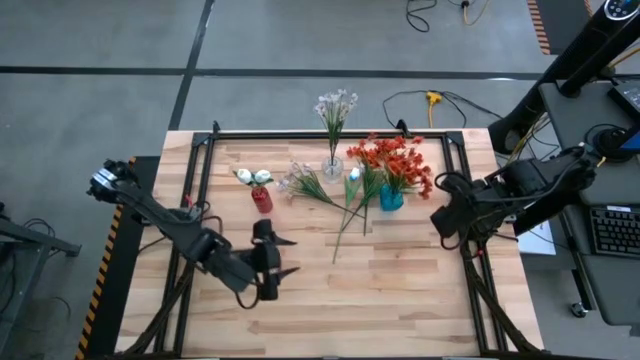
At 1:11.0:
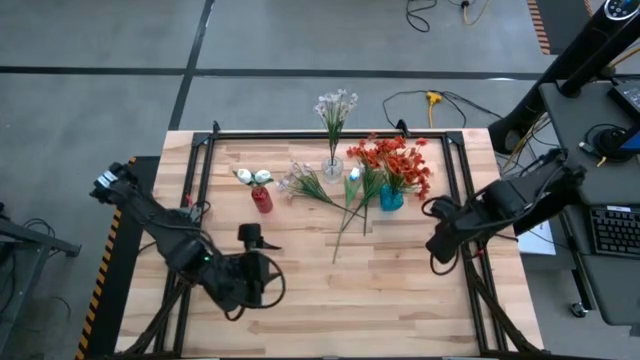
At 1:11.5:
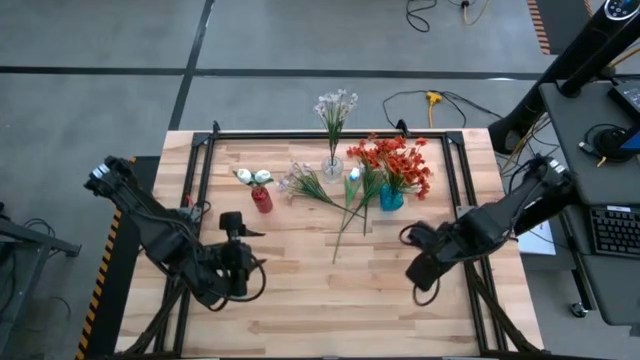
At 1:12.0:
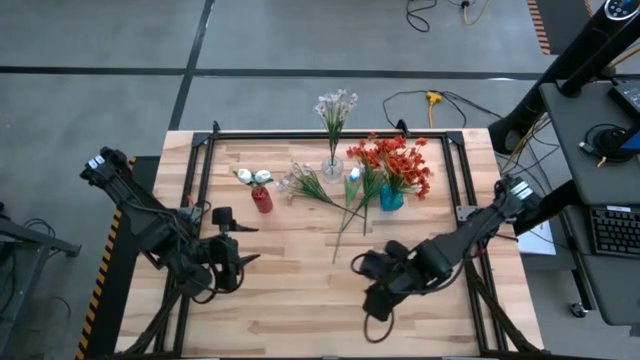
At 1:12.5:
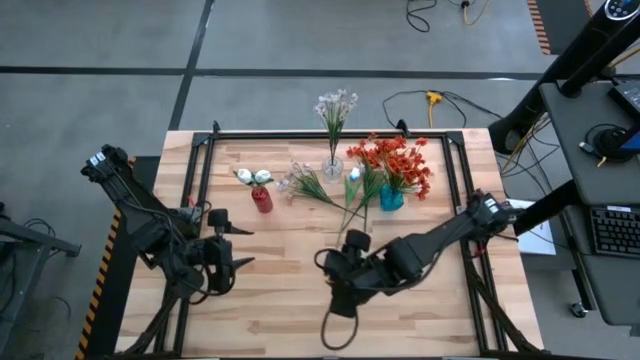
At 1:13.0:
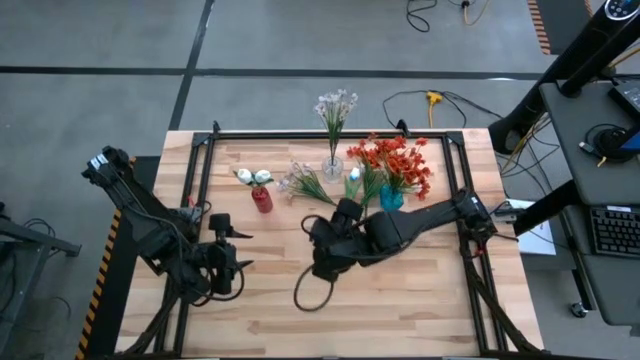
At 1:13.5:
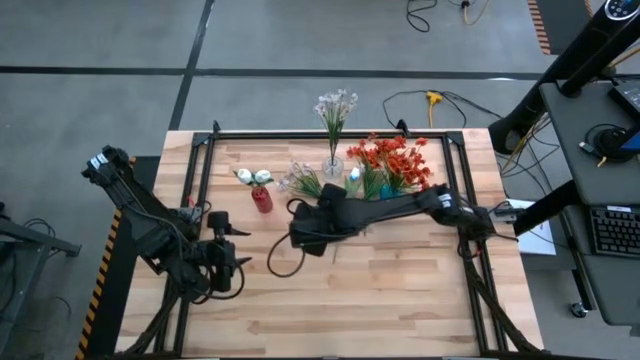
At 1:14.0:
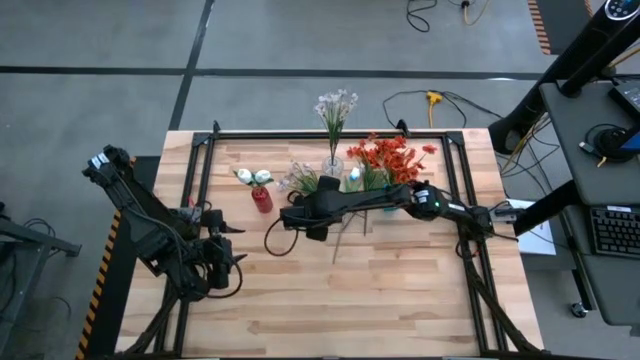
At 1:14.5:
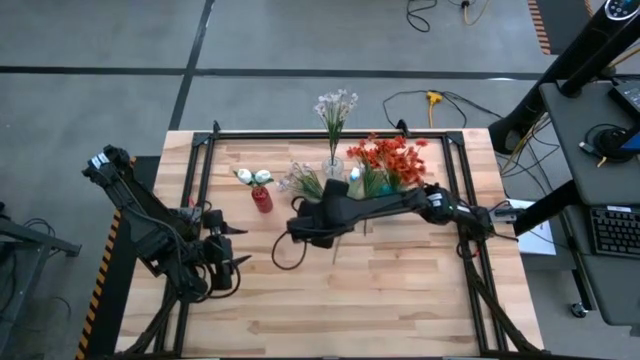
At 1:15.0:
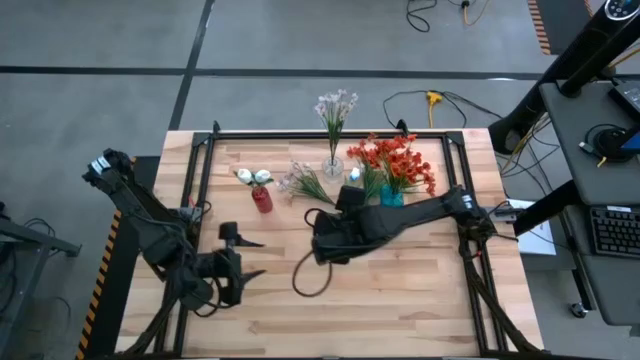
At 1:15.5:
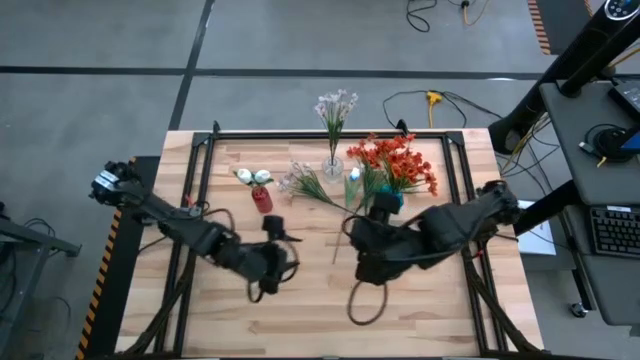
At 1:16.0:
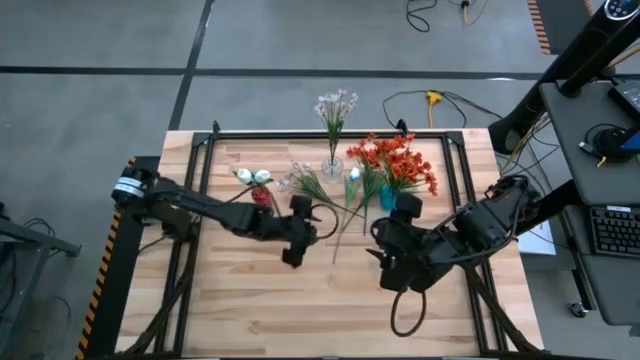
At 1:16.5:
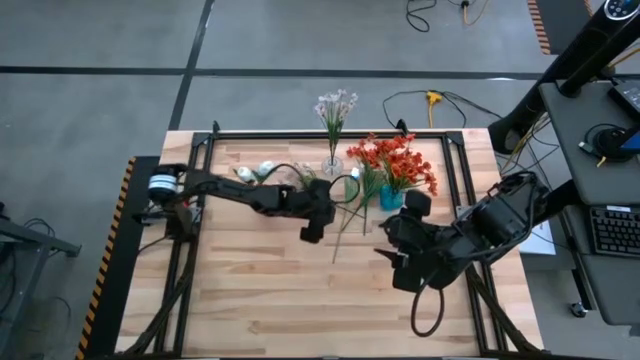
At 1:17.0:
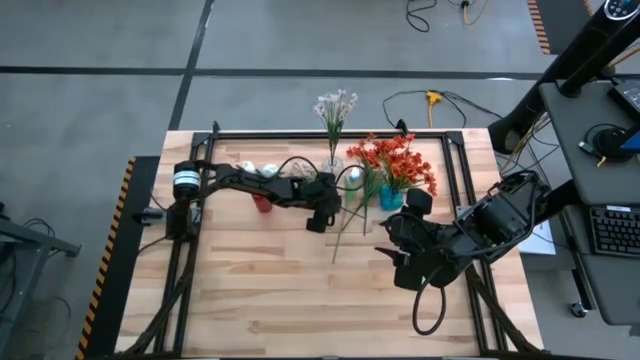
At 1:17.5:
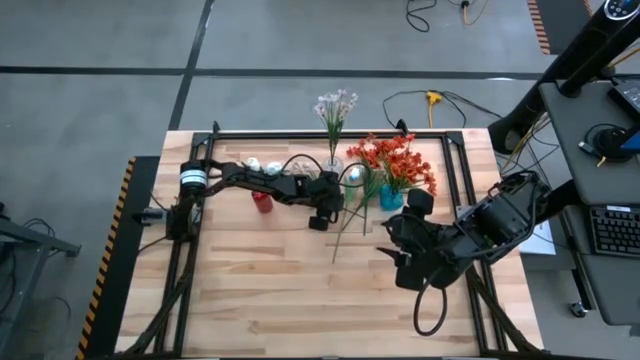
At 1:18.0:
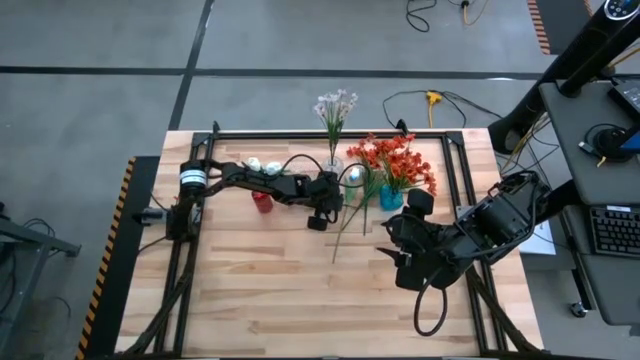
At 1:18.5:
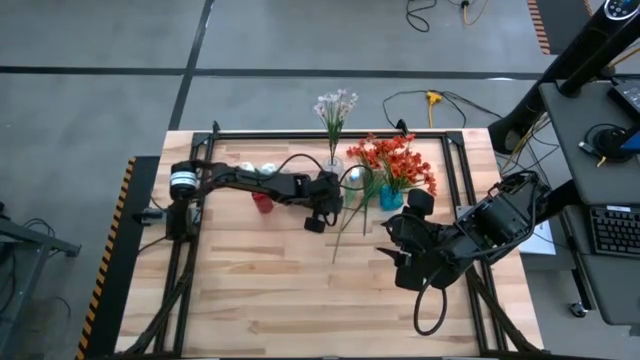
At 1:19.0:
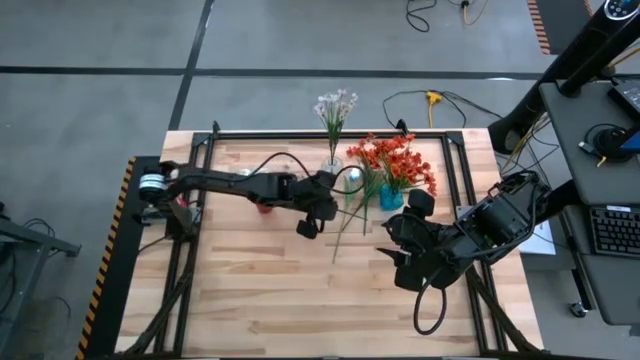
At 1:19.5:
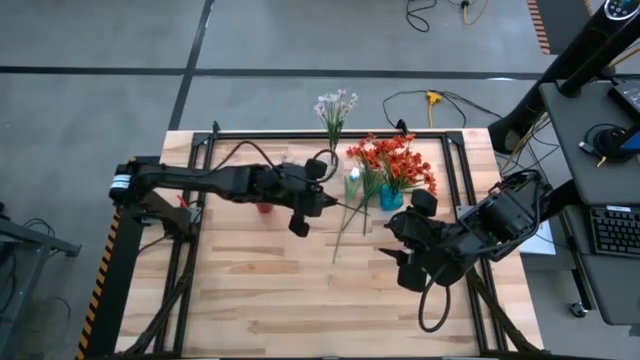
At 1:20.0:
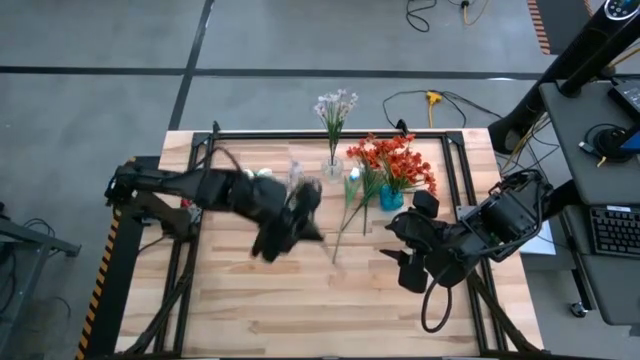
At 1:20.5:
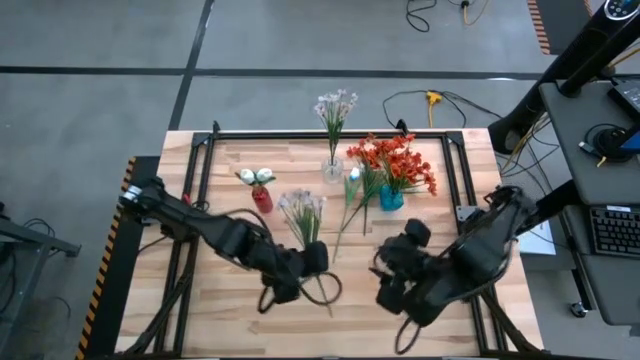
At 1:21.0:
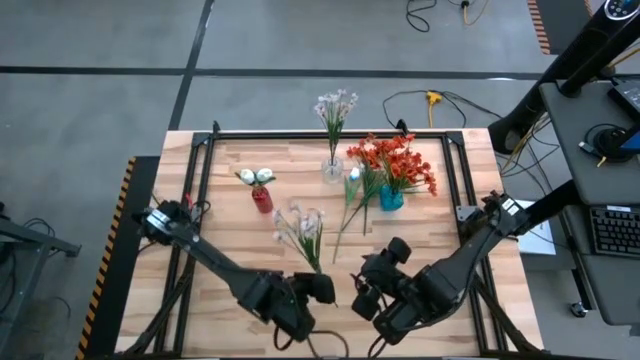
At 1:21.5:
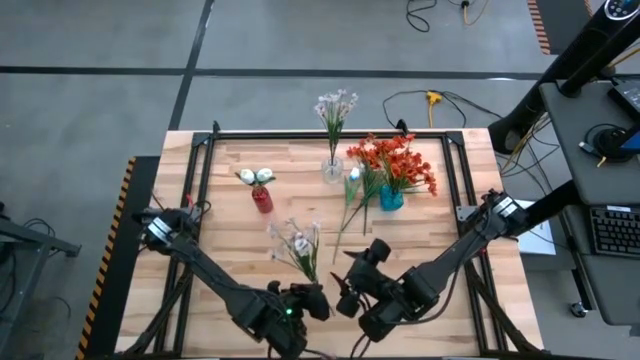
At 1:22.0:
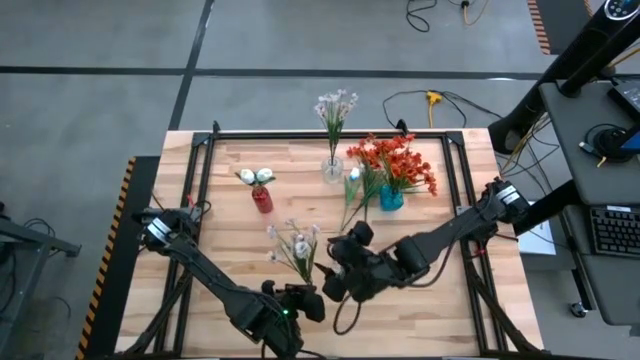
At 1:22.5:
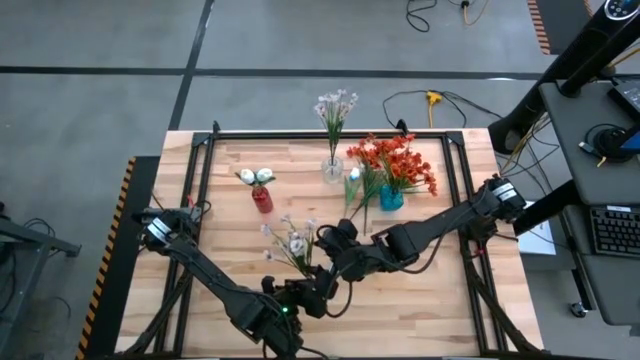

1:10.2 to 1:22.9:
Task: Sort flowers into vase by color
Put the left white flowers into the transparent vase

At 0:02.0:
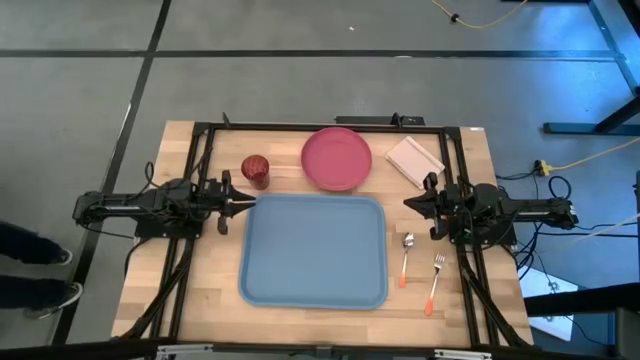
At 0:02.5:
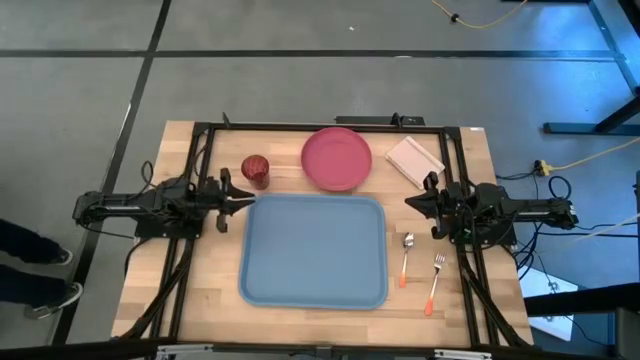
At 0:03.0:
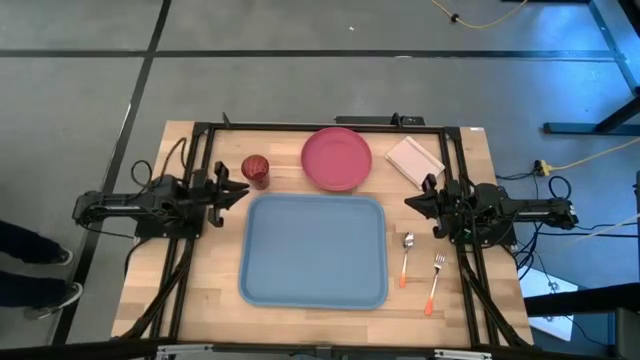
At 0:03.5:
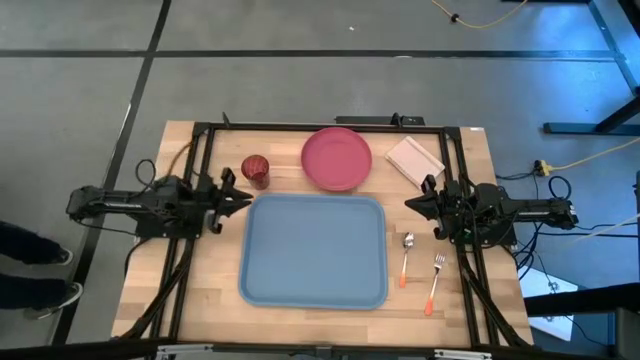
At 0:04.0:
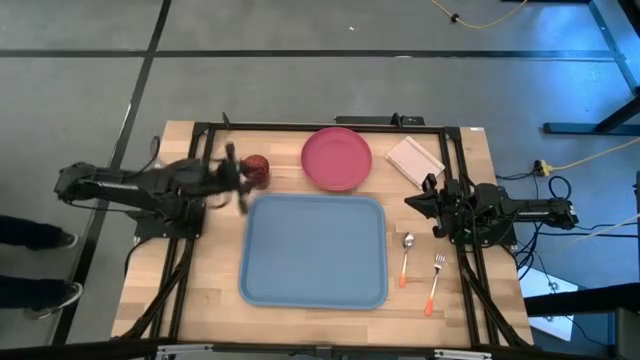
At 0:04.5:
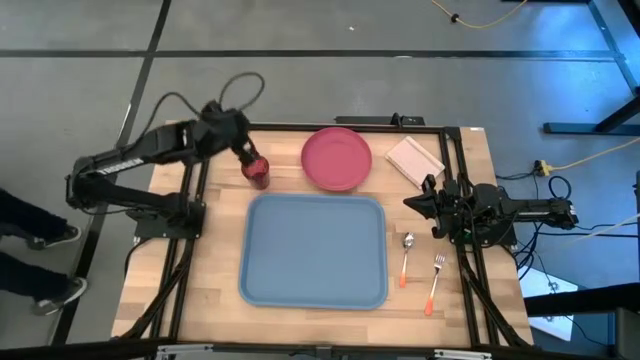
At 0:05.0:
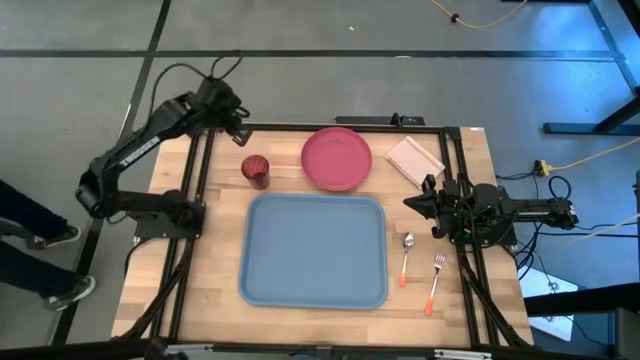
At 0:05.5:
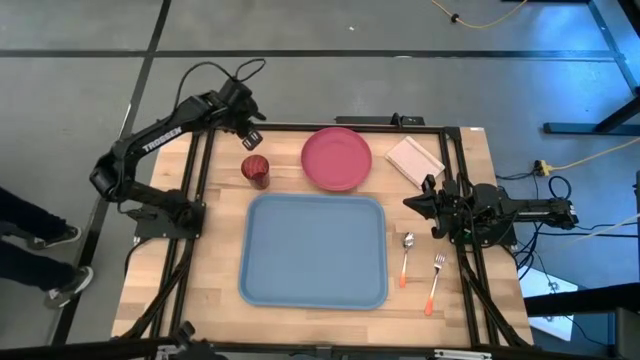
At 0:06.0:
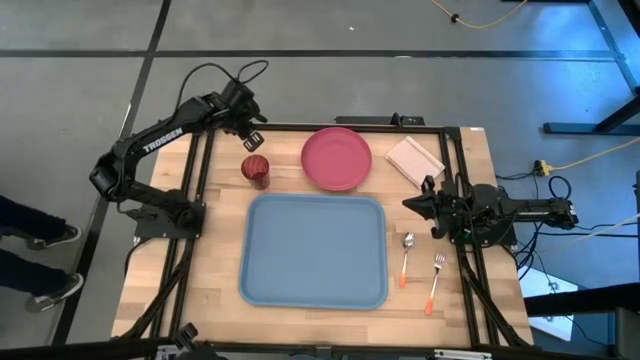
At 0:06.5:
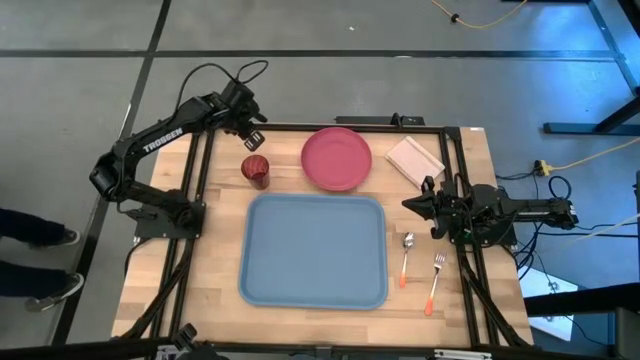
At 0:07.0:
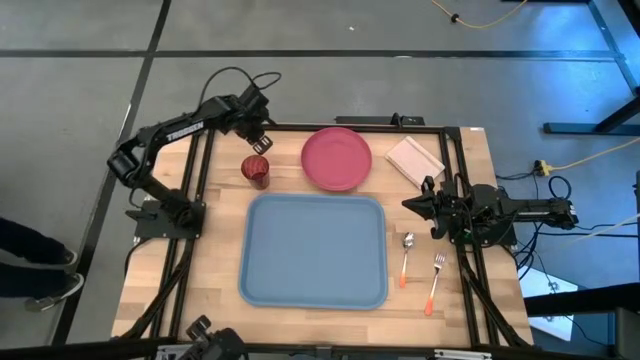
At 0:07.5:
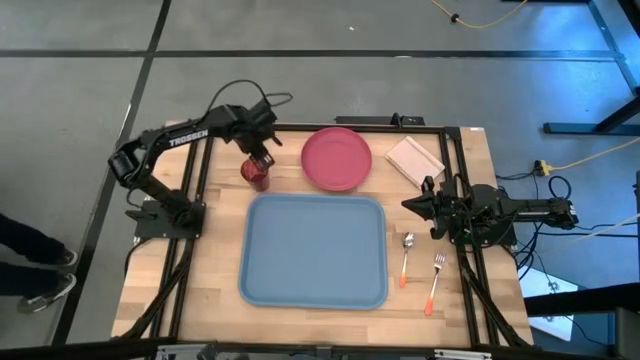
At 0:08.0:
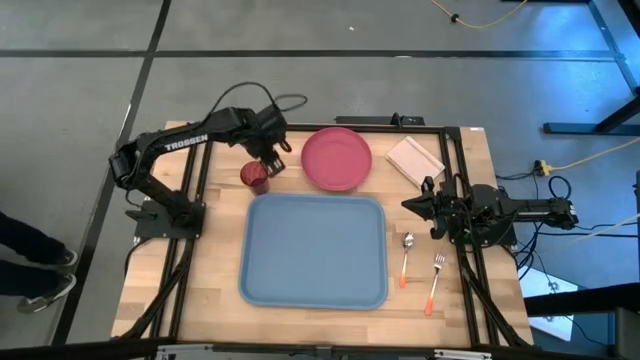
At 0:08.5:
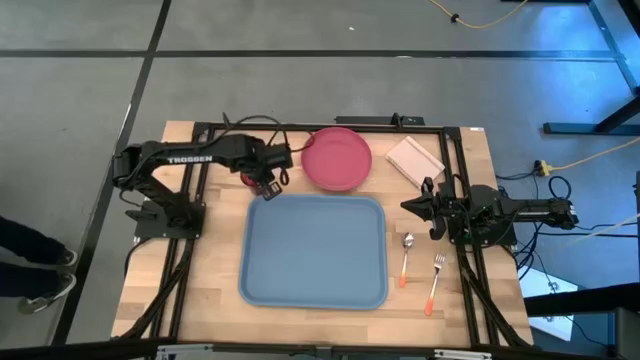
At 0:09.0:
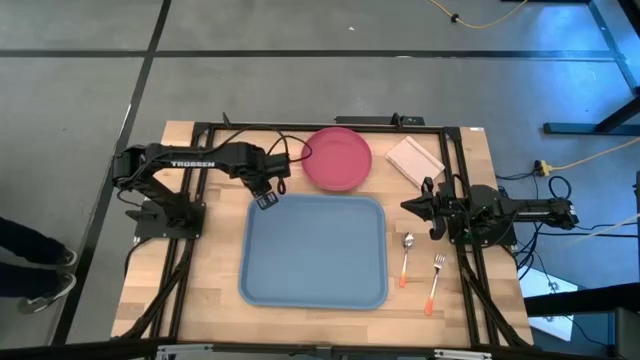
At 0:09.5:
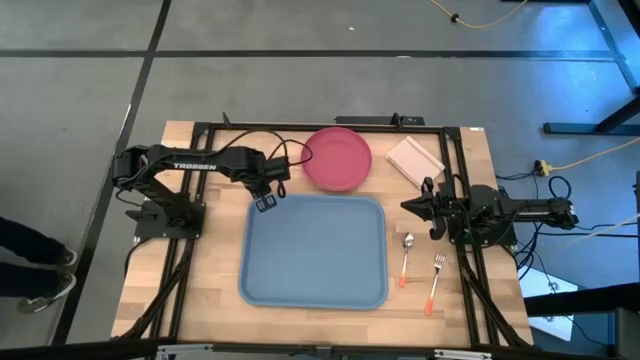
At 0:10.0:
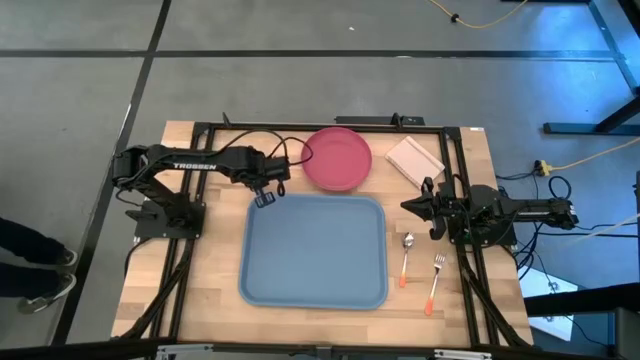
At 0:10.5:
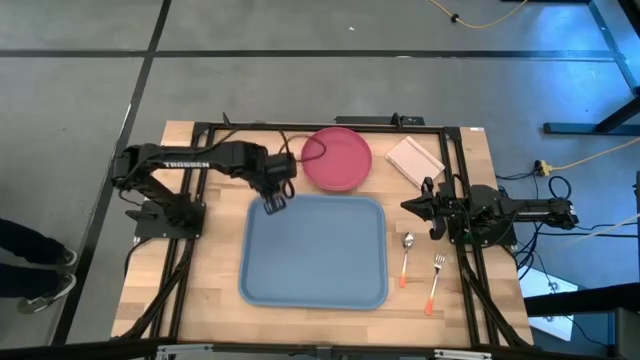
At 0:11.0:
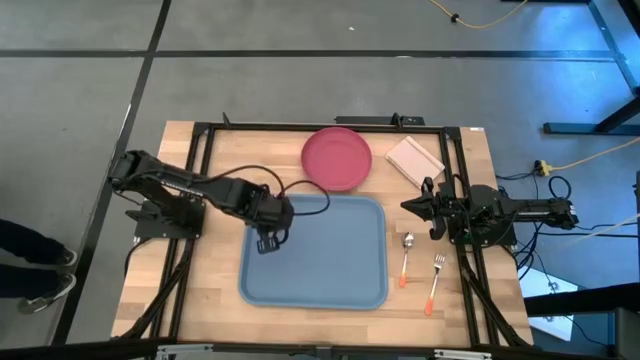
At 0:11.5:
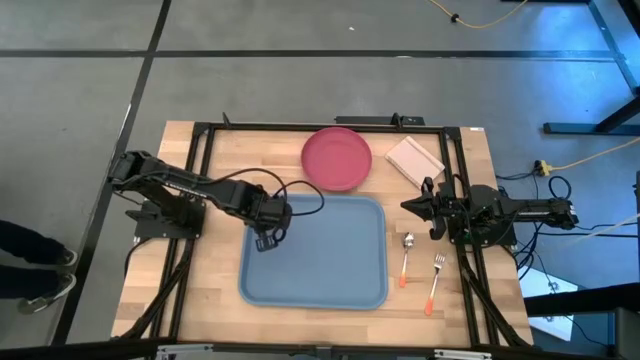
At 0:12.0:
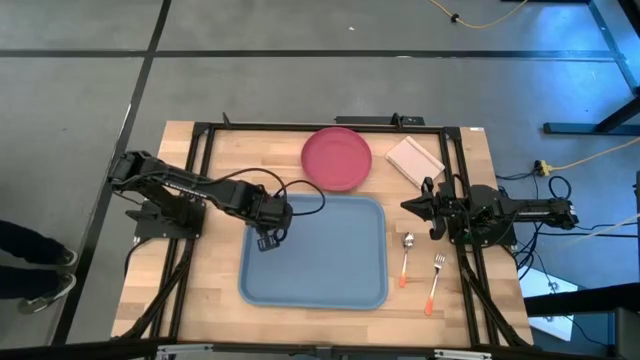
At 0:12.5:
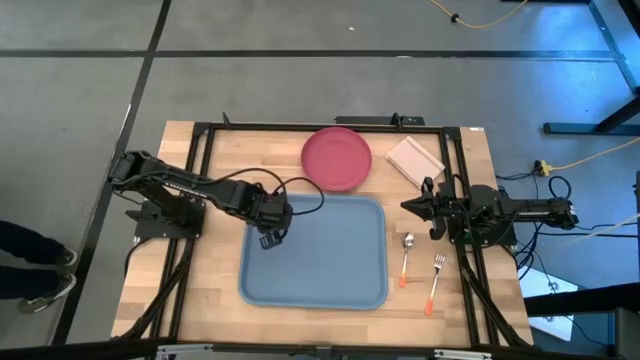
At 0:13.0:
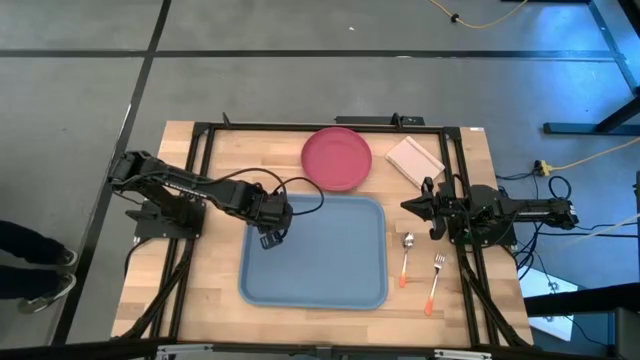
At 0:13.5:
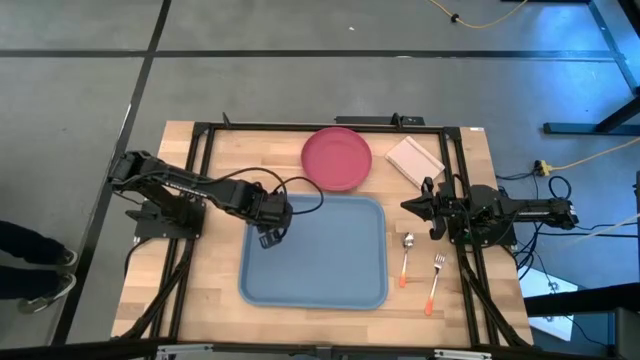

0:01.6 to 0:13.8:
Task: Pick and place plate/cup/fork/spoon on tray
Put the red glass on the top left of the blue serving tray
